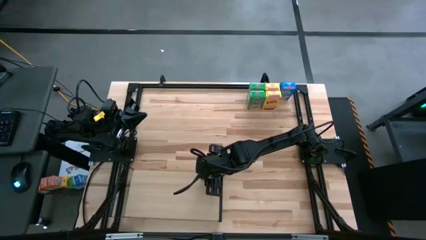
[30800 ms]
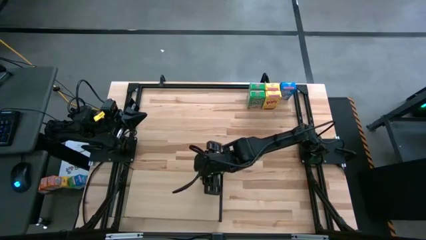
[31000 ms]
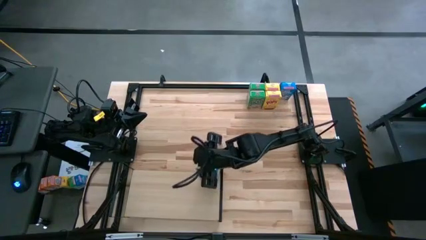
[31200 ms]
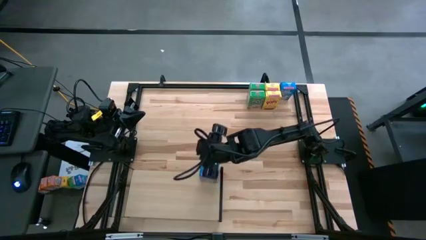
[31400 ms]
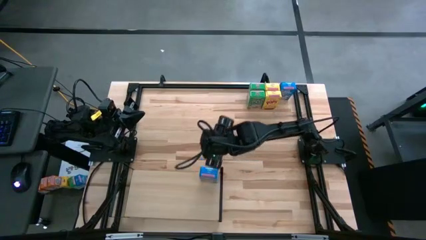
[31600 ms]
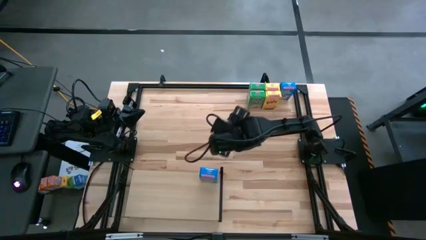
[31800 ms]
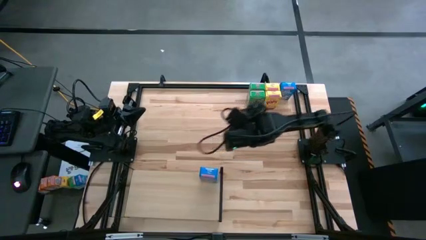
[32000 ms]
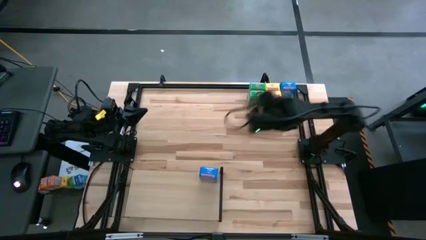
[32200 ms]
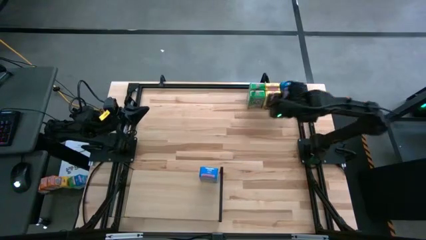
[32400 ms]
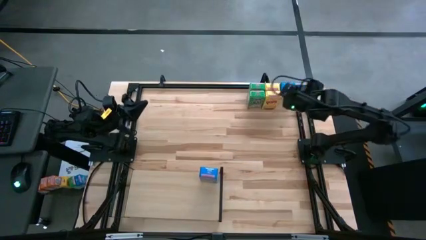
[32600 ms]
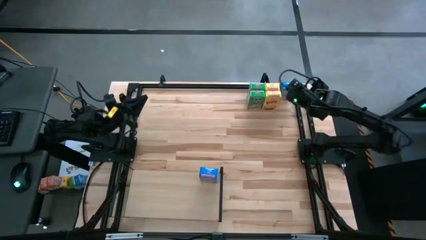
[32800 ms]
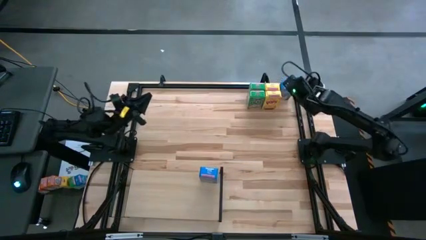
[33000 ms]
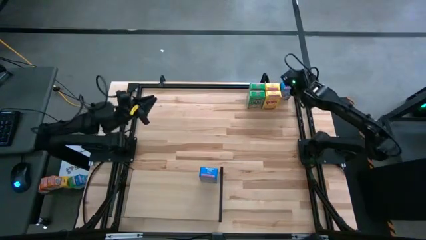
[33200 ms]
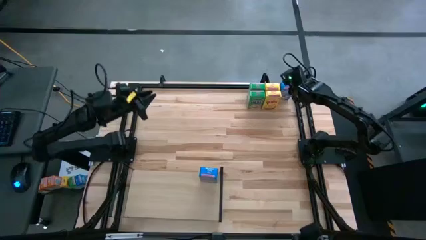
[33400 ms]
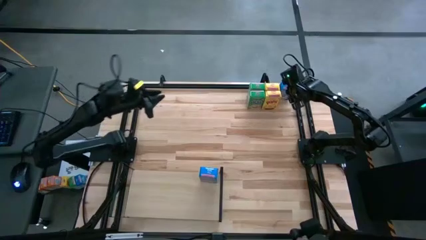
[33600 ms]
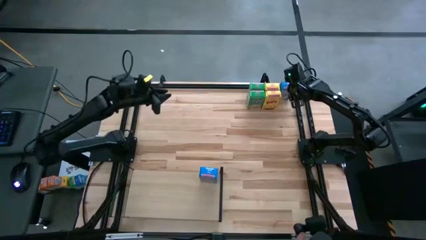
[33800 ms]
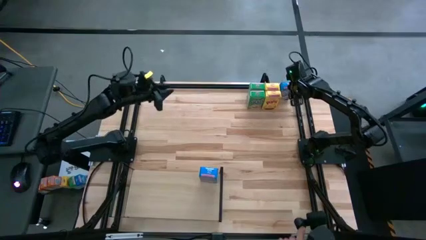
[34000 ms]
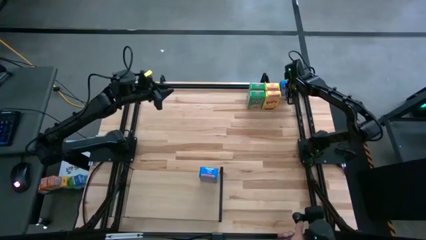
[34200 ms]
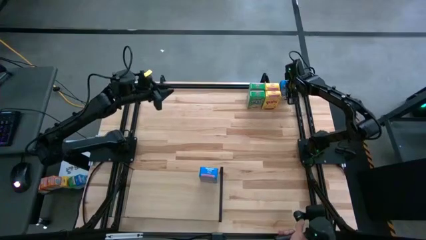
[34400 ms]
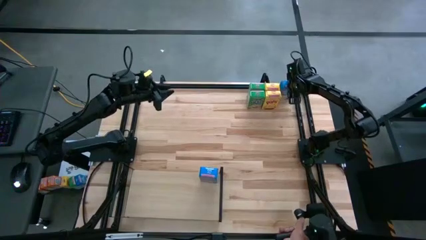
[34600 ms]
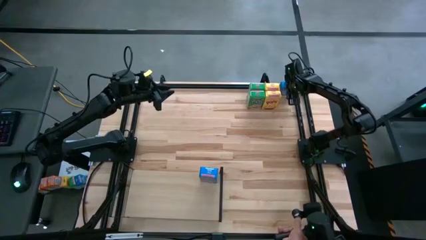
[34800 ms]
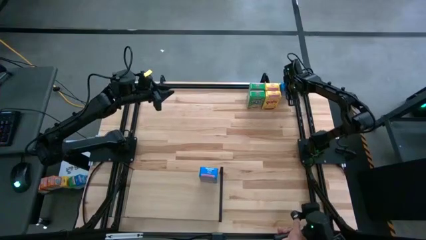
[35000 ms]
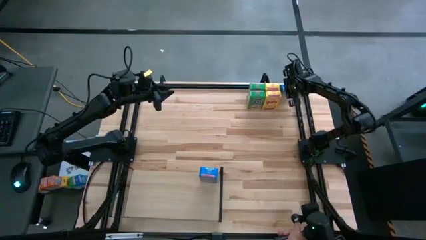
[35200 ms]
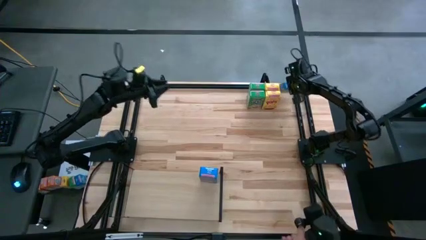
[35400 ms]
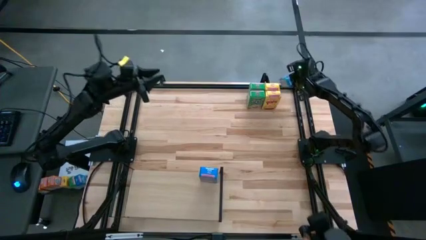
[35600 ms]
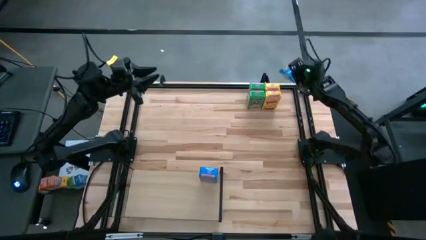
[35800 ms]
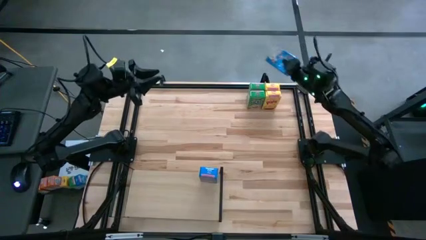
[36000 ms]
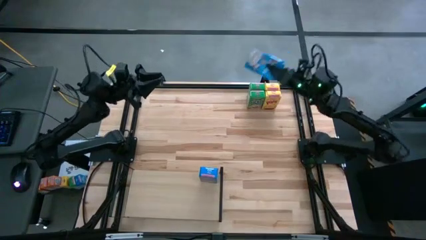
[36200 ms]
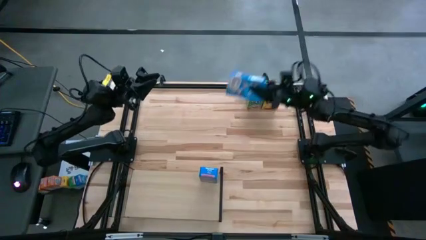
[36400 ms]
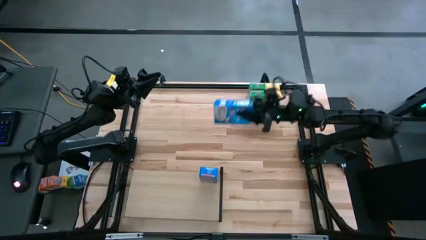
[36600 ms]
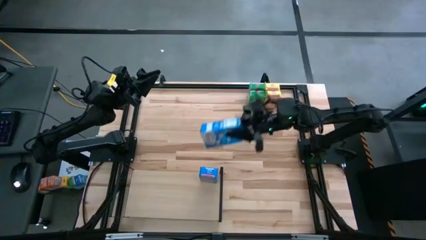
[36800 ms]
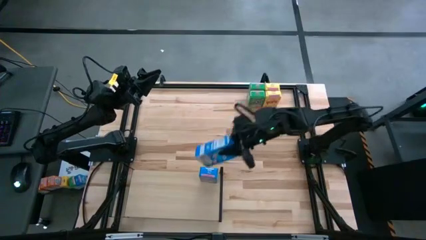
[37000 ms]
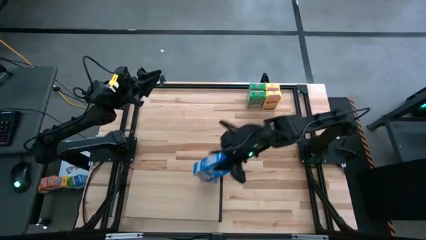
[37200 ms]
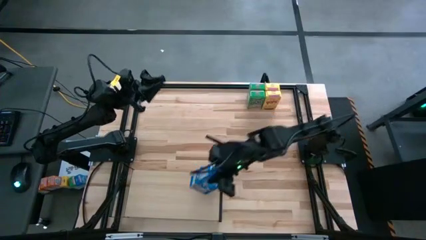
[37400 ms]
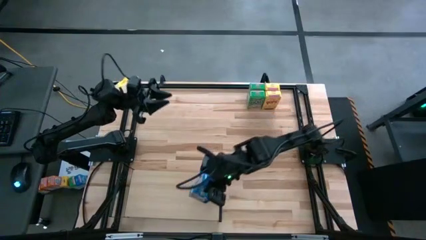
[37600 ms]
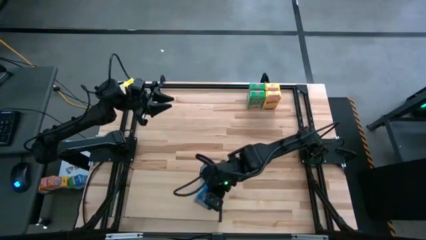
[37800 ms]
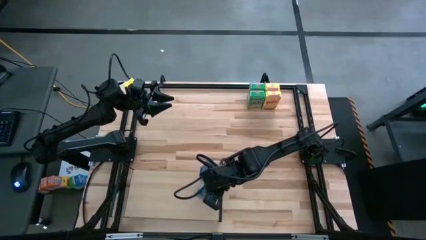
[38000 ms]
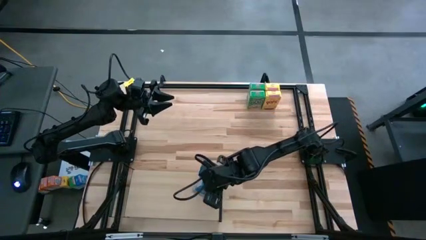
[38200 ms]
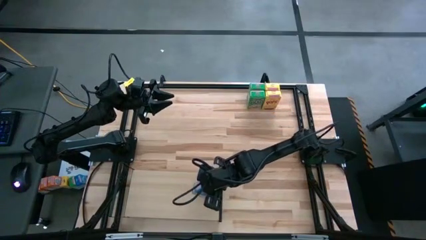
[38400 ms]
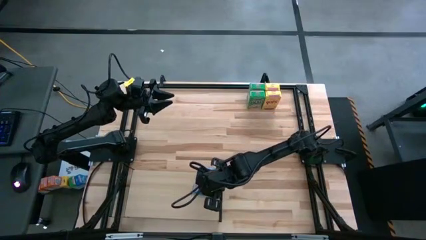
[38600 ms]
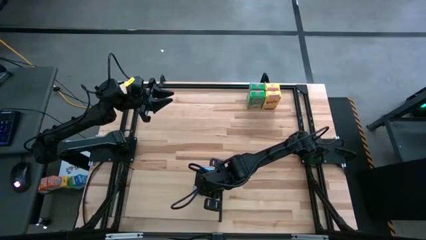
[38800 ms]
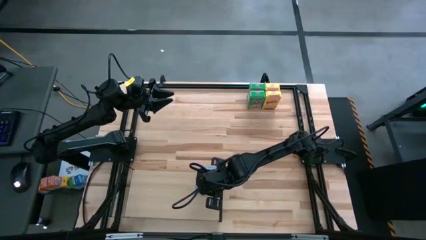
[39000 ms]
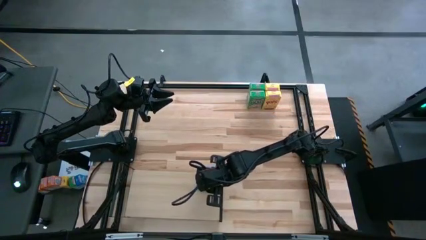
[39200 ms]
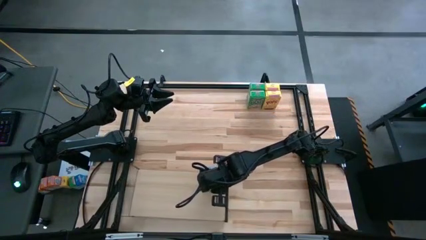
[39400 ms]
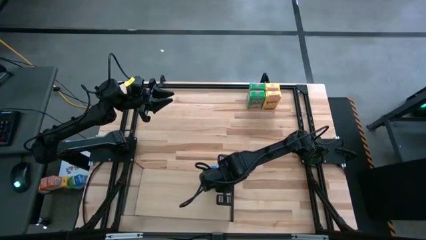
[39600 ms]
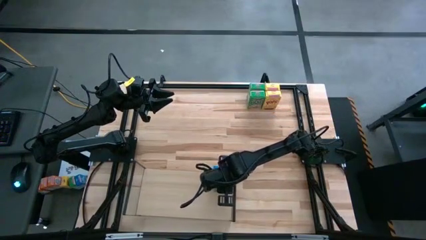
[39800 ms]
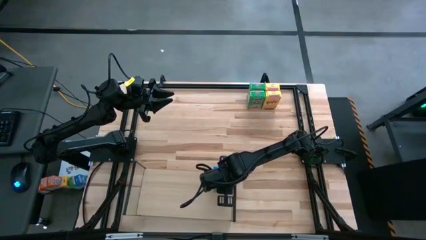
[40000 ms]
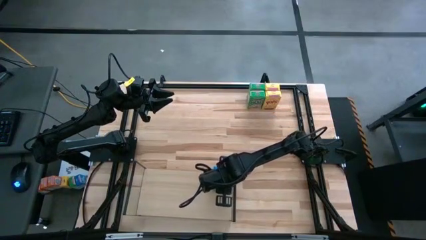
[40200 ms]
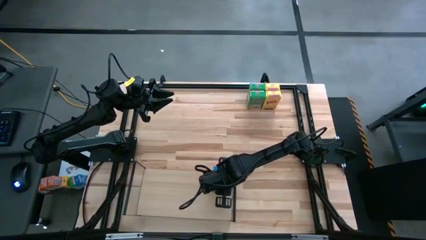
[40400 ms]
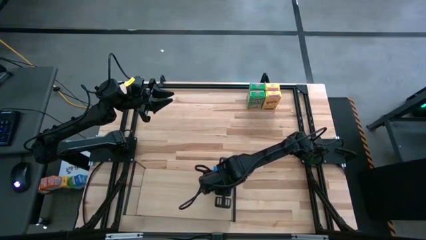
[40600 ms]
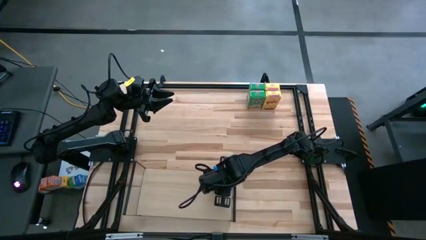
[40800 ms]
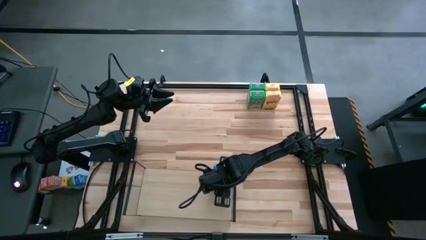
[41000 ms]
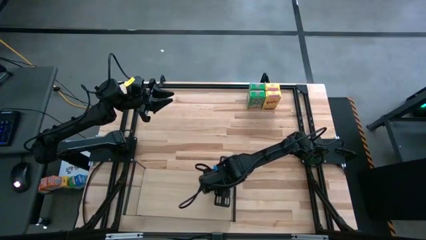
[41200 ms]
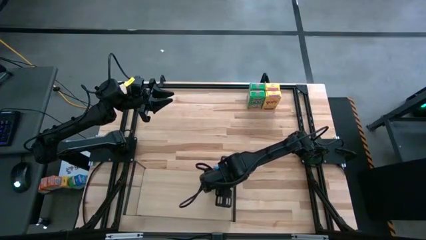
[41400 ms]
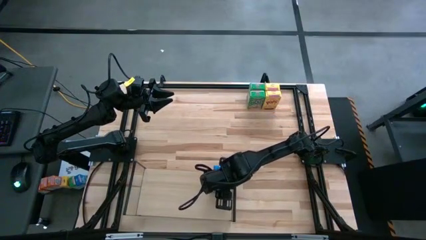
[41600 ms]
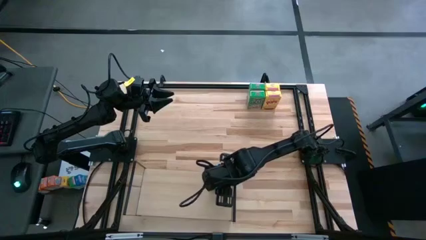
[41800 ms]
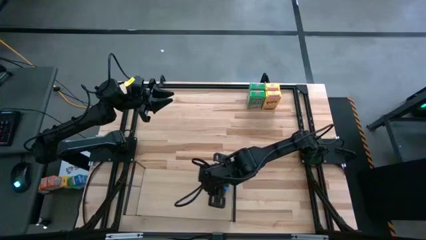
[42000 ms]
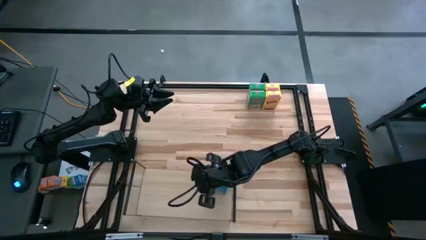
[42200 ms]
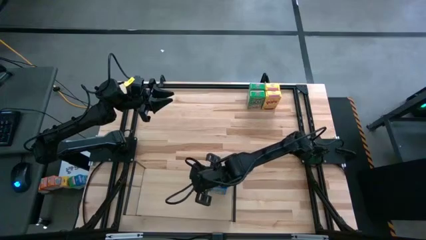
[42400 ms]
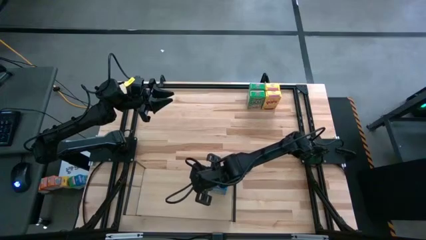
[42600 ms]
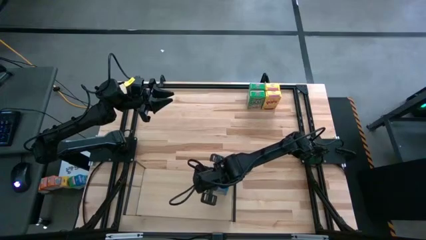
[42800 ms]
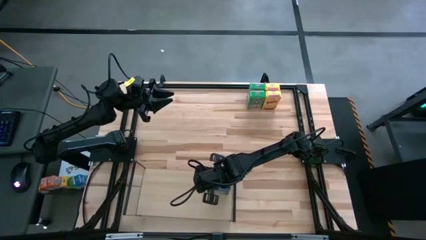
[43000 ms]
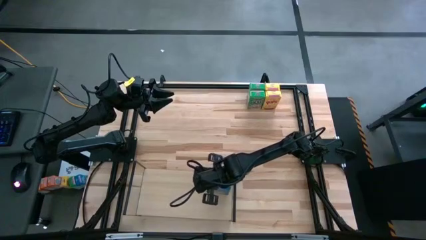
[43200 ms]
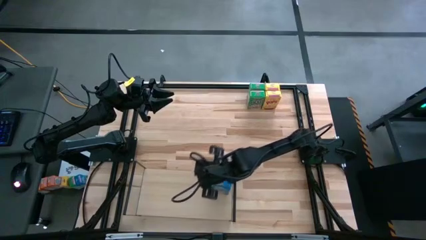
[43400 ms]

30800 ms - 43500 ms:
Task: Stack cereal on shelf
Put the blue cereal box on the shelf aligned with the blue cereal box

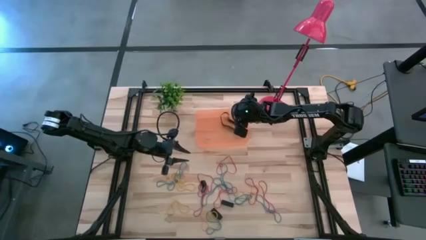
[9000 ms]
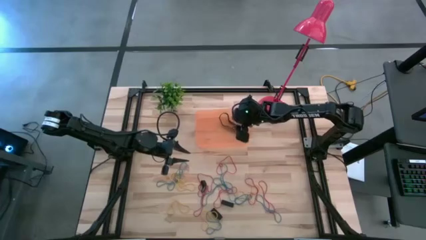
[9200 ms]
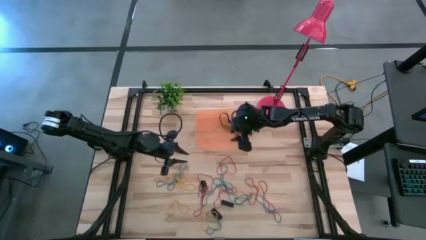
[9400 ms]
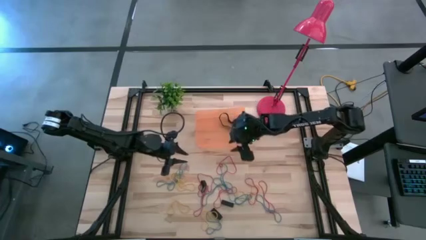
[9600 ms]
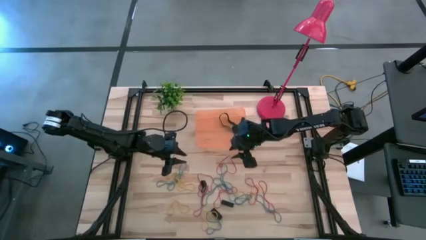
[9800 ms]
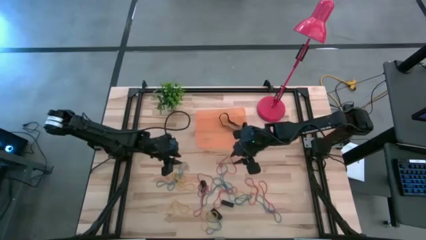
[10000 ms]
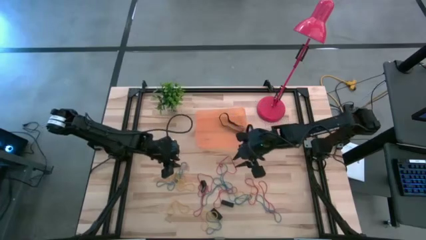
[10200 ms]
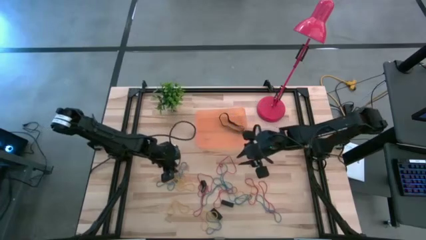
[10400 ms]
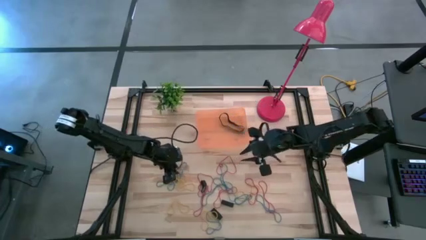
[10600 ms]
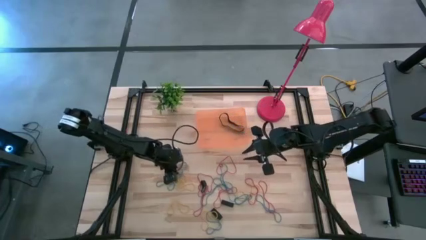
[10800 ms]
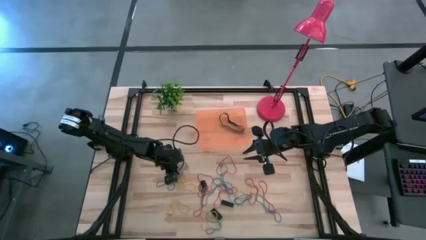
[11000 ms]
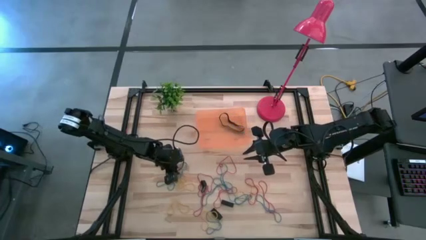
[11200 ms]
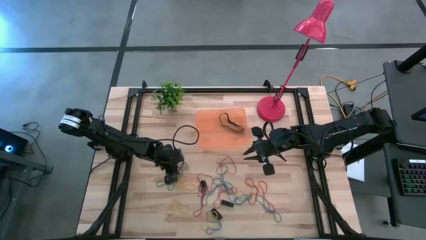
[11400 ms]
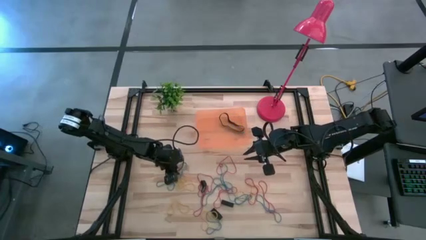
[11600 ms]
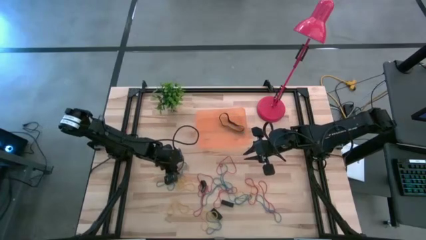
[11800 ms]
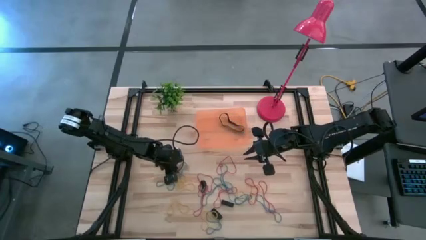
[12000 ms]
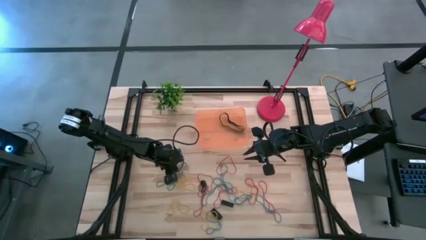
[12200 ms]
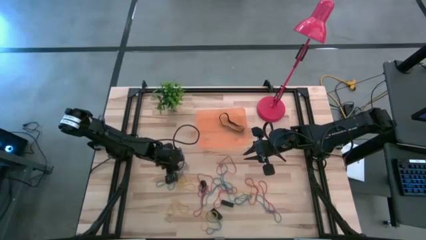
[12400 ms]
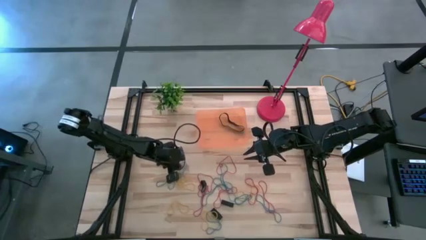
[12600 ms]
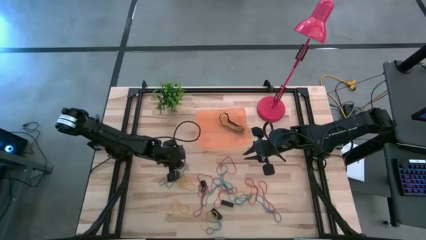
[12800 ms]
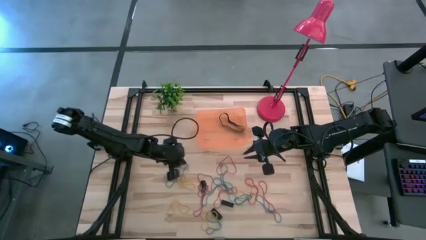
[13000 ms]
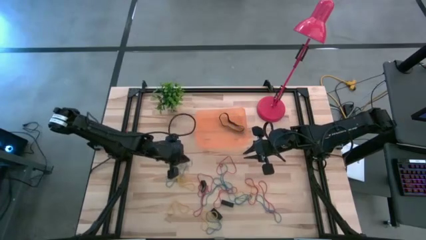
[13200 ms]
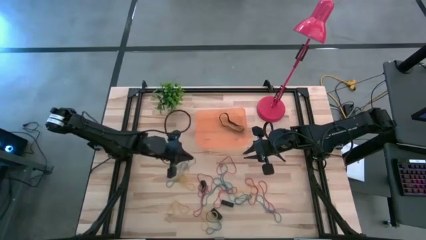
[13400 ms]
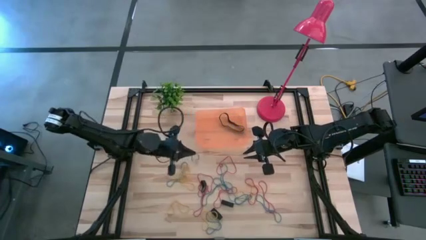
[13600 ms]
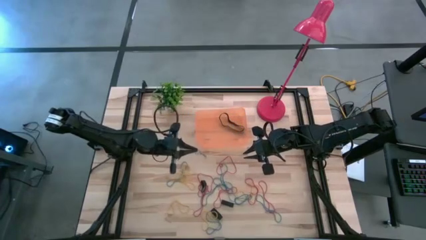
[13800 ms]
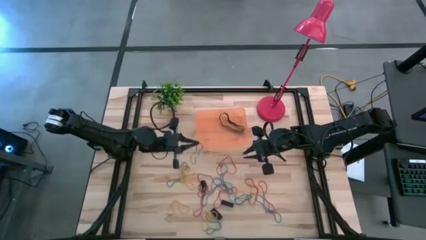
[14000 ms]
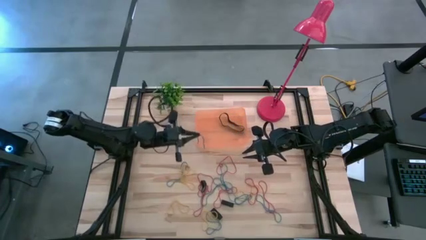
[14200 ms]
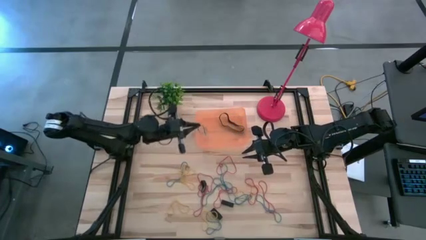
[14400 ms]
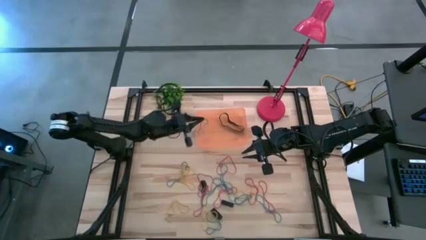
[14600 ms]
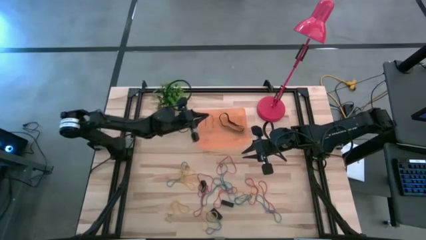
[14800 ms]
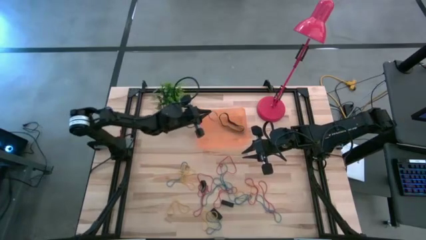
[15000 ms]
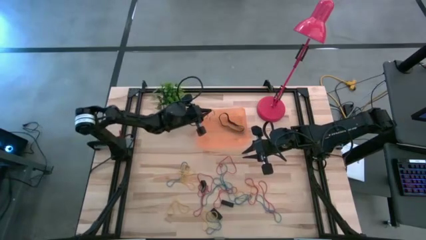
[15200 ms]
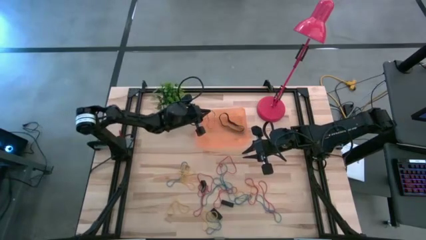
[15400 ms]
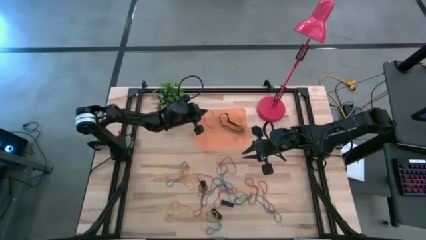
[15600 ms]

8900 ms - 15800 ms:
Task: Pick and place rubber bands into bin
Put the blue rubber band into the orange bin
